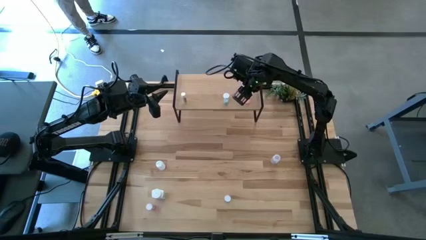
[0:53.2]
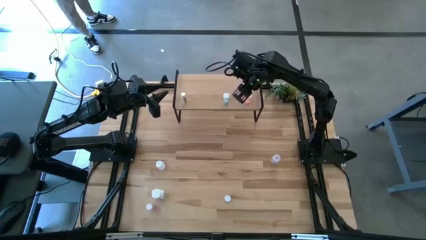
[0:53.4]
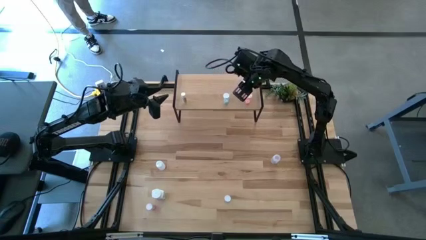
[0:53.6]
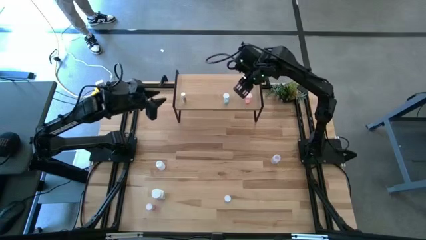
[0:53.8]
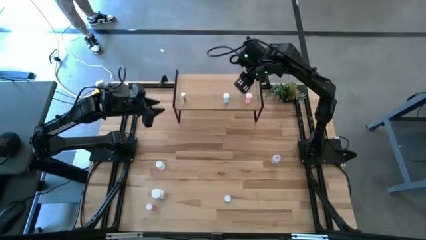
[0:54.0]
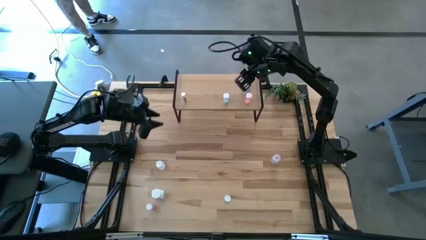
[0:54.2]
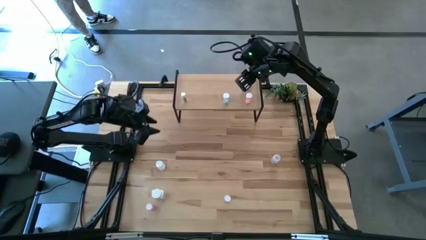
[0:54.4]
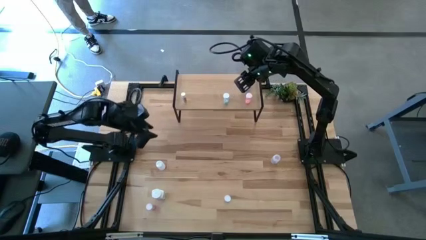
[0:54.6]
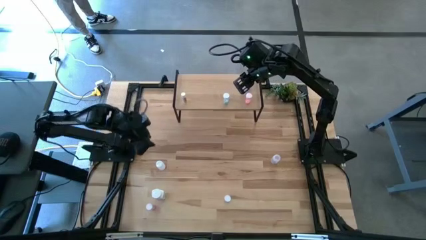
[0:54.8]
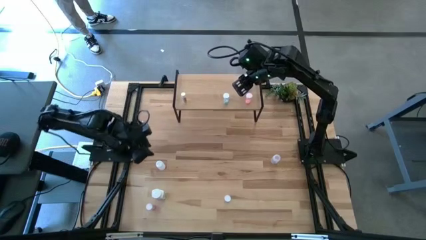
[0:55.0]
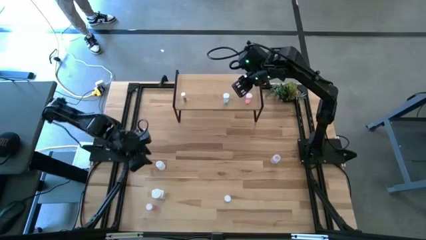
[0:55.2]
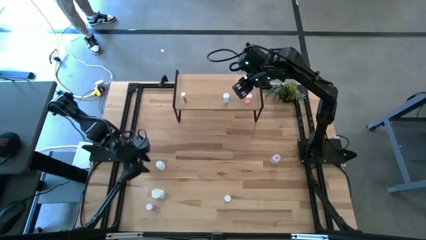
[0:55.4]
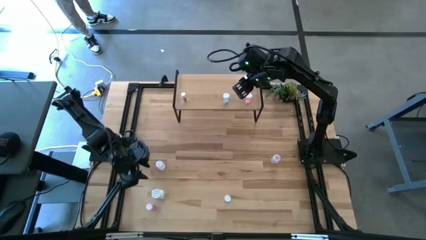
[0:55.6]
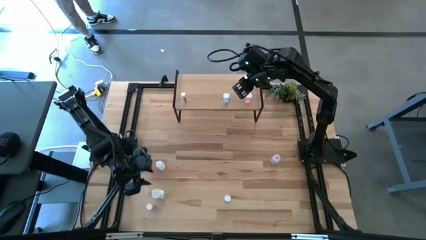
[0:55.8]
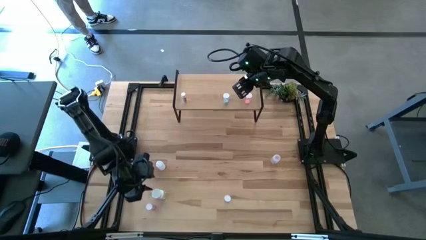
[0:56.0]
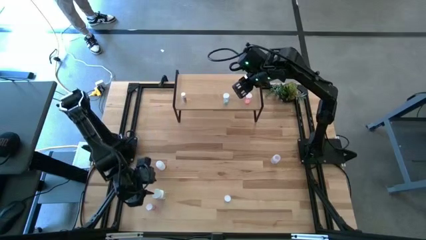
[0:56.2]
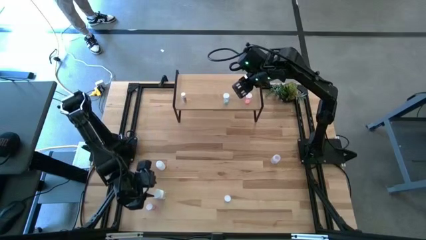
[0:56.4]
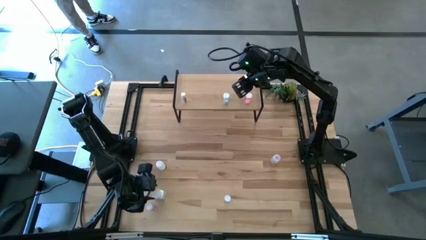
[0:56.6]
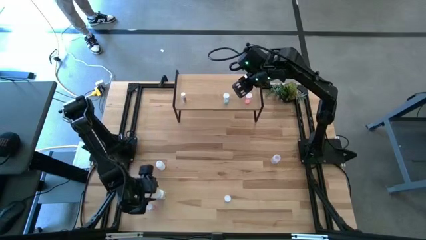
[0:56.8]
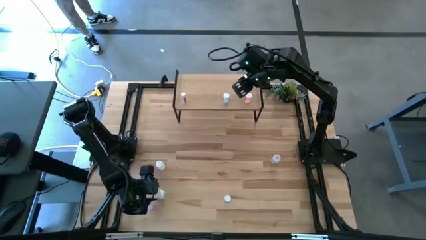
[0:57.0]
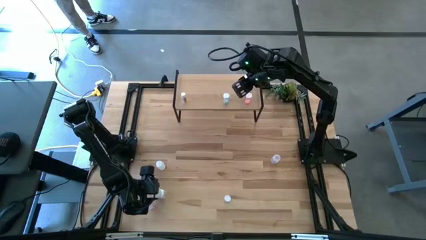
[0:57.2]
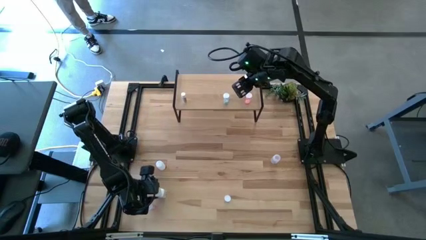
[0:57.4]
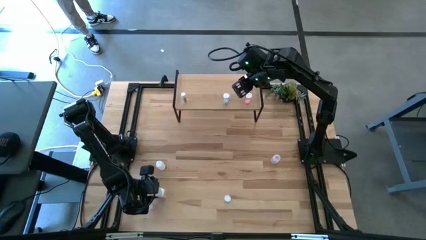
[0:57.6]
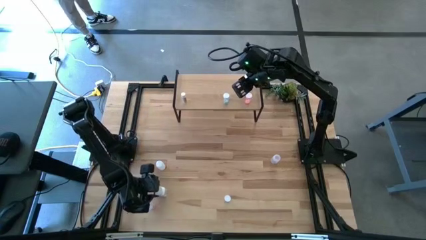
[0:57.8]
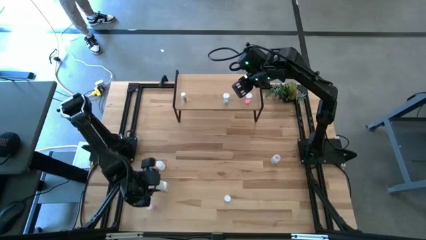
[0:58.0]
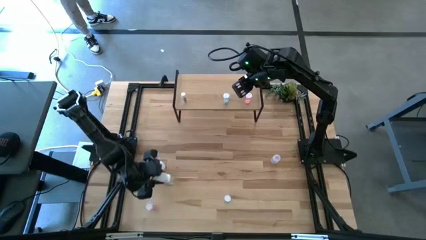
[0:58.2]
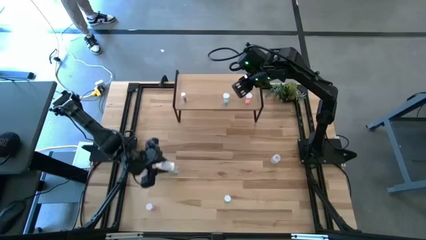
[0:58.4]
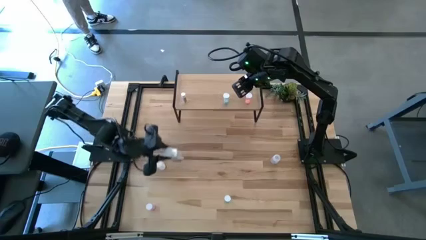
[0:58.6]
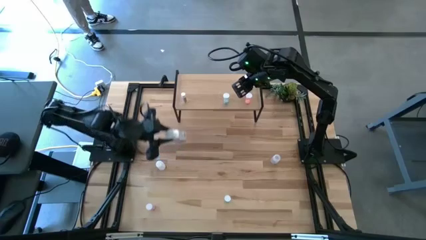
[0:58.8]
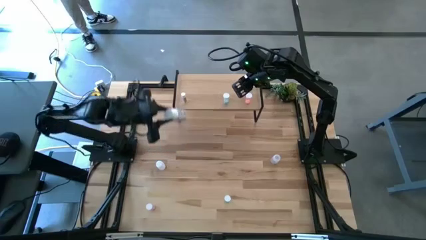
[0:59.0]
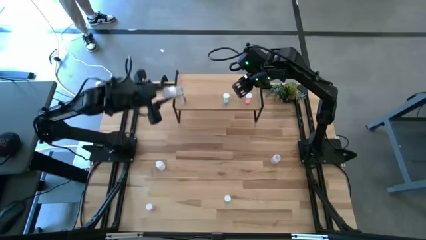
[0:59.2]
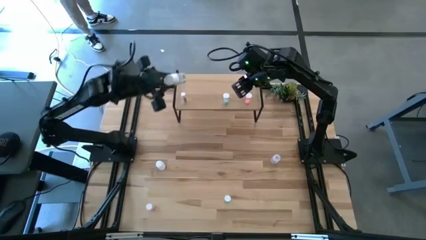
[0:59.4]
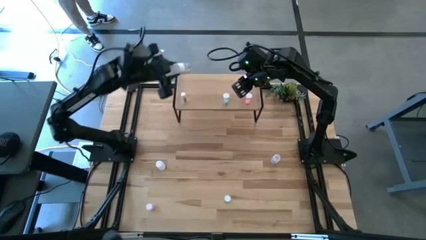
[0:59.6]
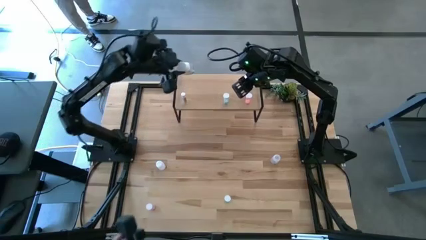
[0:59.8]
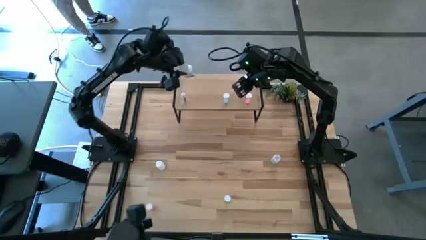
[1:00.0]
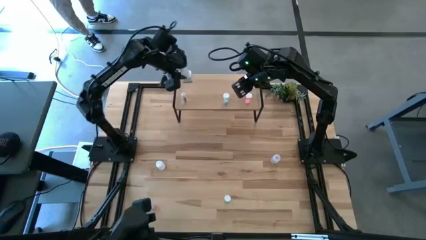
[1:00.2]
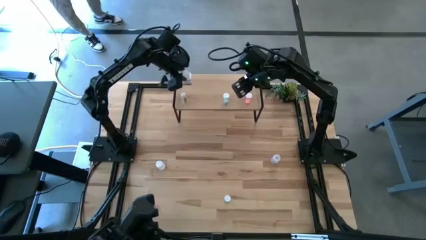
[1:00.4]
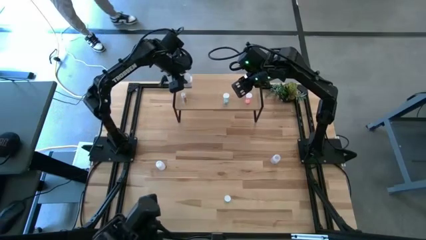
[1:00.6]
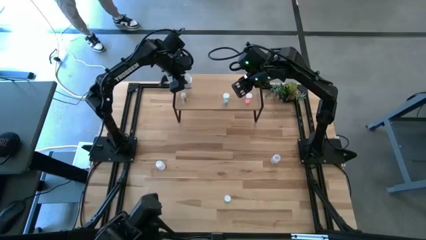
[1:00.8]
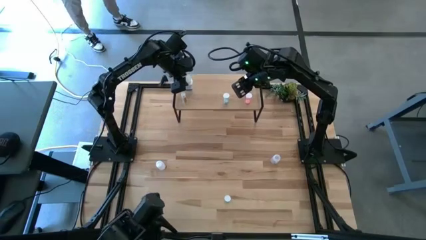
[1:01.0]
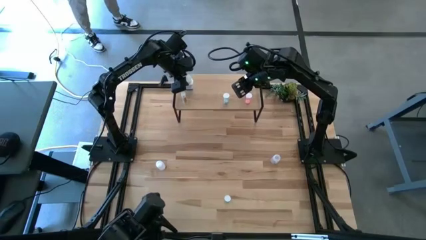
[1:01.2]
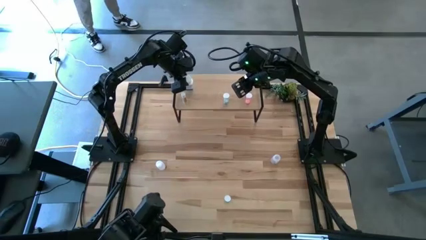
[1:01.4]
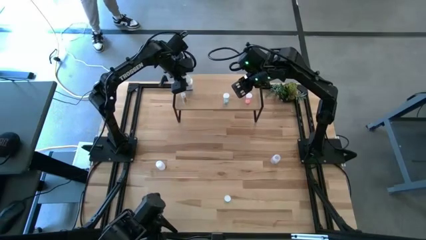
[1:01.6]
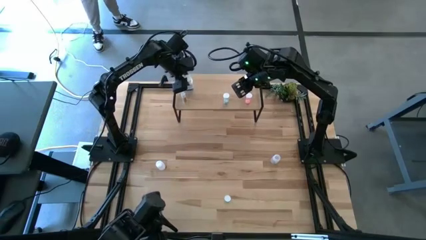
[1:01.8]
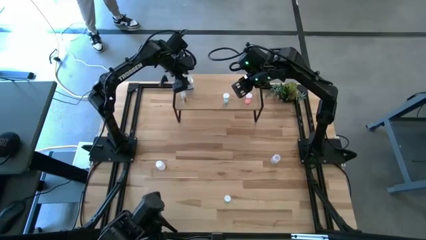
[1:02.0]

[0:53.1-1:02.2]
Task: Pick and place medicine bottles onto shelf by color
Put the white pill bottle on the shelf

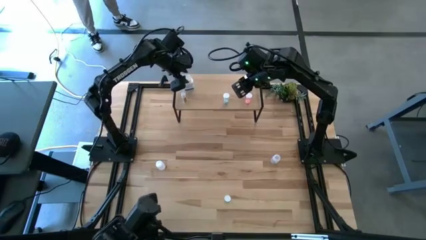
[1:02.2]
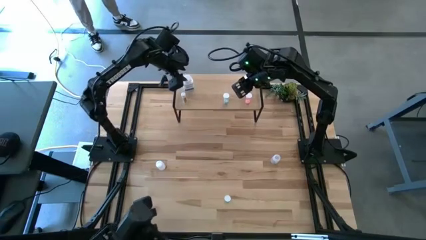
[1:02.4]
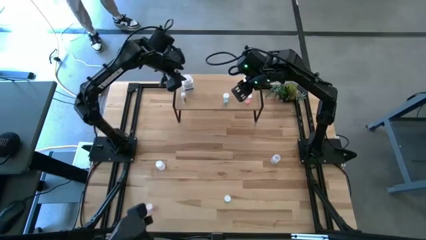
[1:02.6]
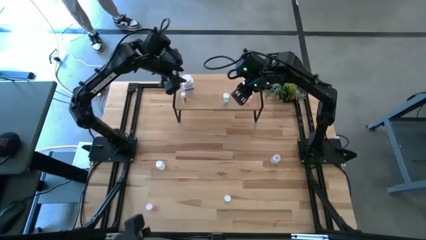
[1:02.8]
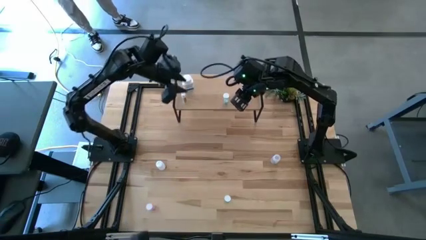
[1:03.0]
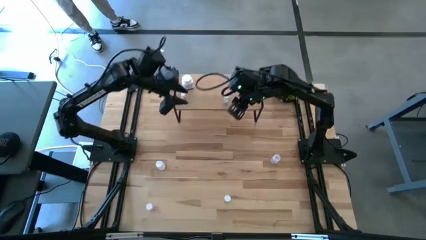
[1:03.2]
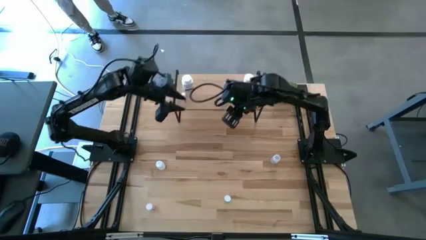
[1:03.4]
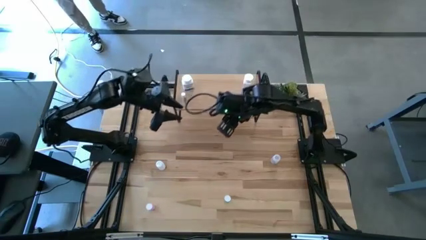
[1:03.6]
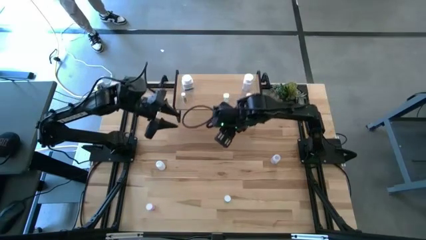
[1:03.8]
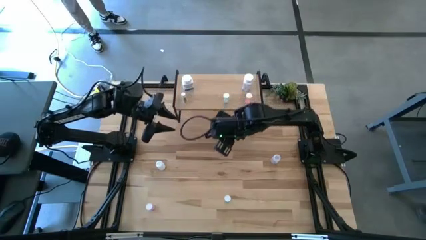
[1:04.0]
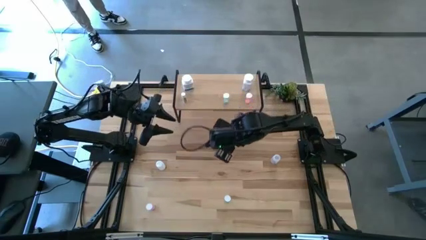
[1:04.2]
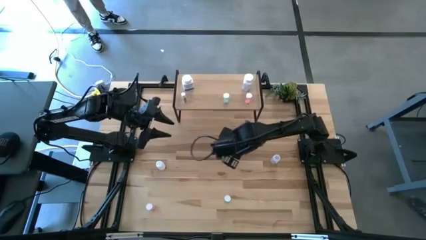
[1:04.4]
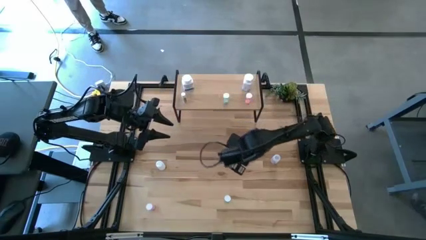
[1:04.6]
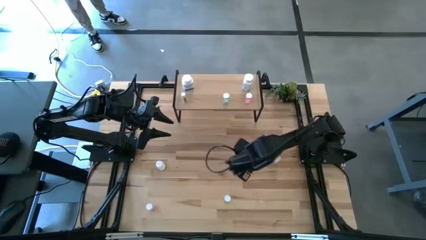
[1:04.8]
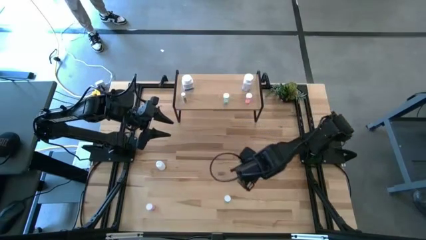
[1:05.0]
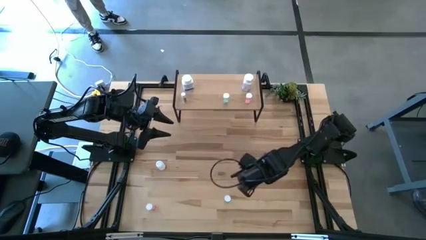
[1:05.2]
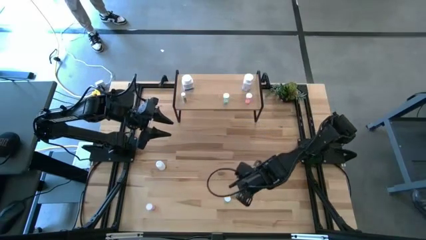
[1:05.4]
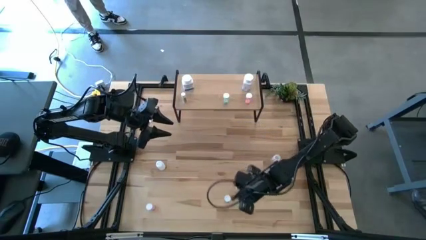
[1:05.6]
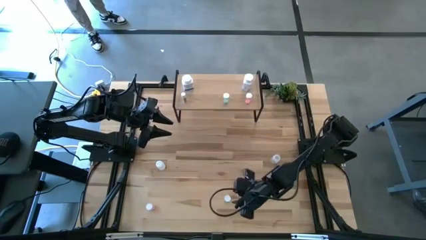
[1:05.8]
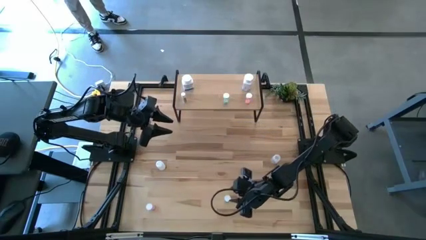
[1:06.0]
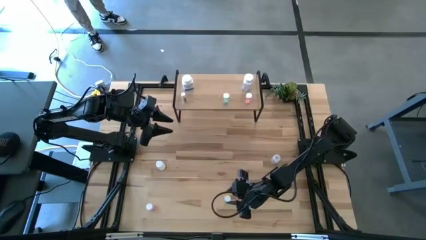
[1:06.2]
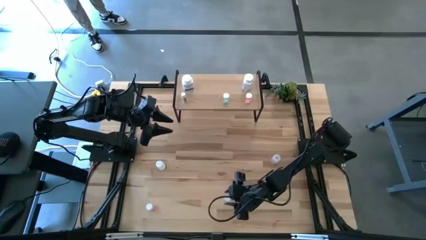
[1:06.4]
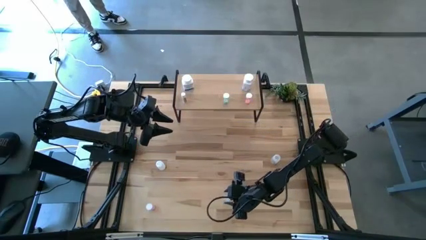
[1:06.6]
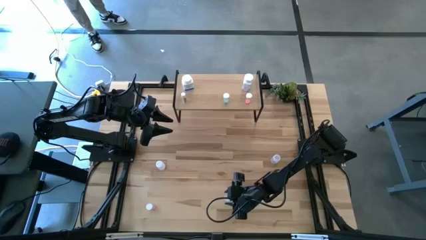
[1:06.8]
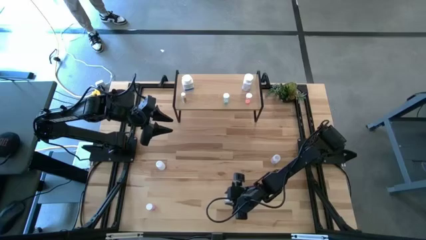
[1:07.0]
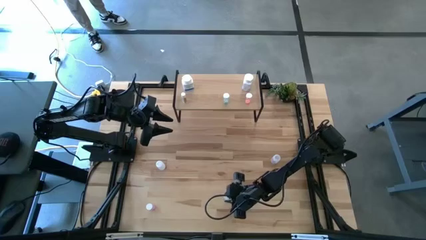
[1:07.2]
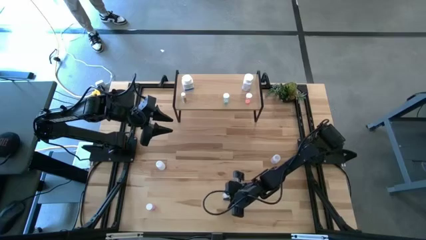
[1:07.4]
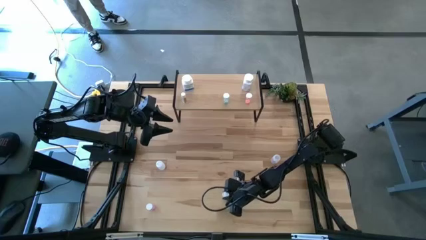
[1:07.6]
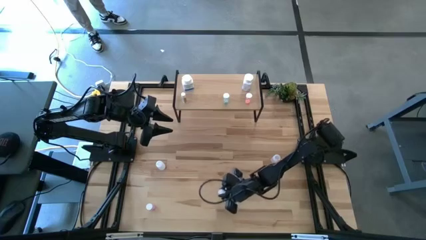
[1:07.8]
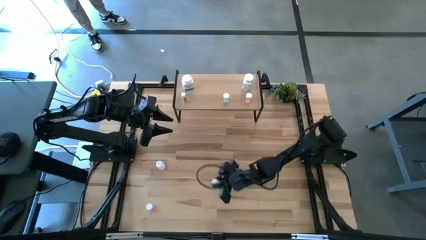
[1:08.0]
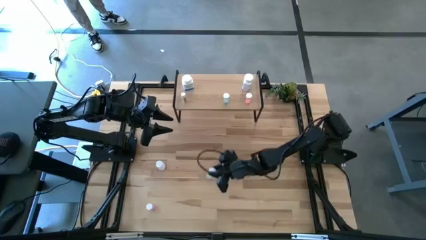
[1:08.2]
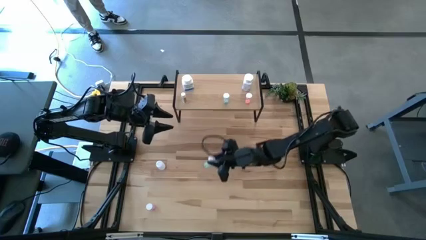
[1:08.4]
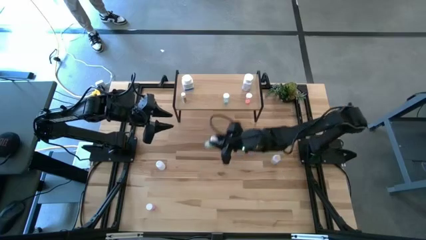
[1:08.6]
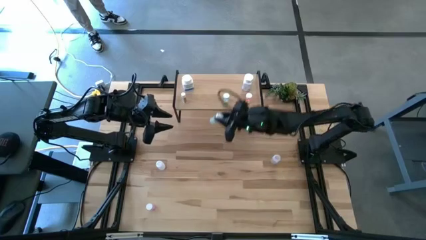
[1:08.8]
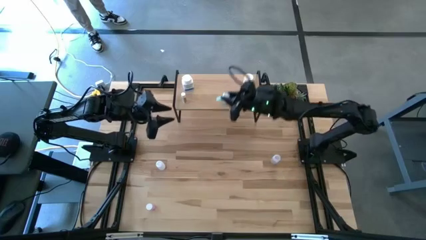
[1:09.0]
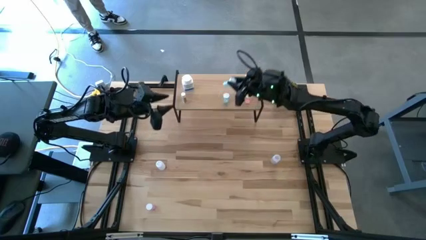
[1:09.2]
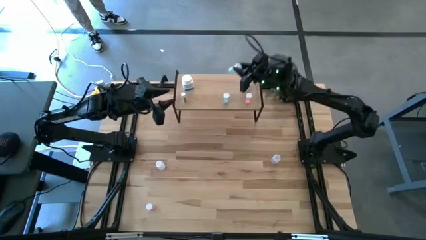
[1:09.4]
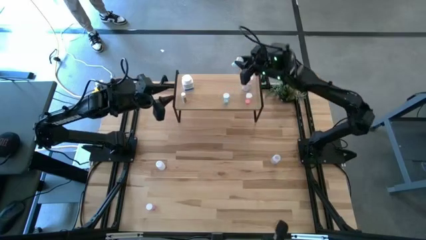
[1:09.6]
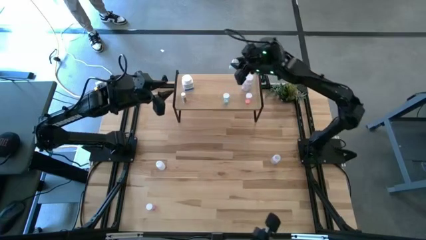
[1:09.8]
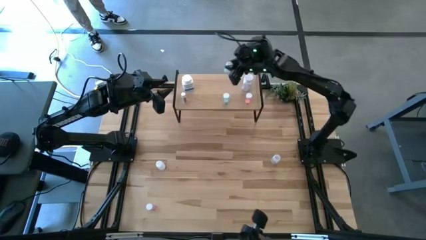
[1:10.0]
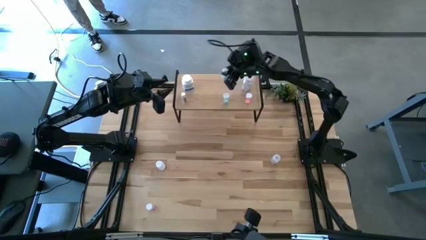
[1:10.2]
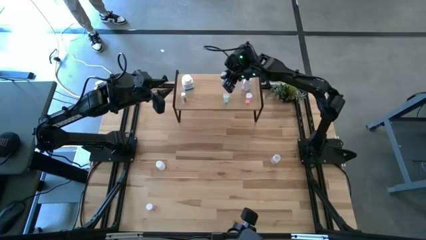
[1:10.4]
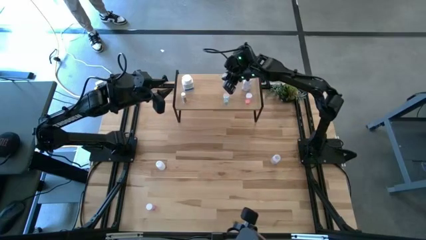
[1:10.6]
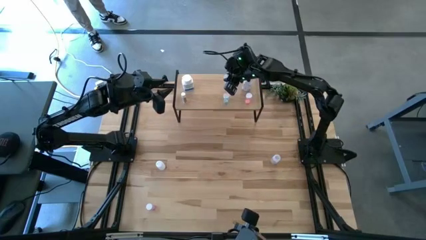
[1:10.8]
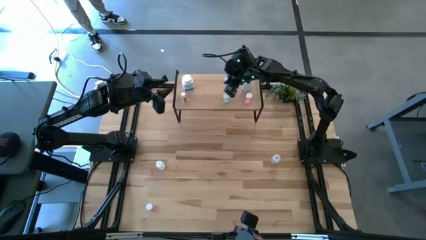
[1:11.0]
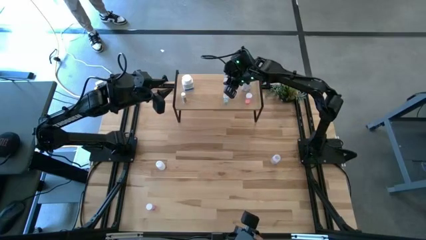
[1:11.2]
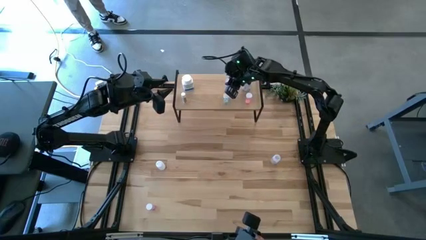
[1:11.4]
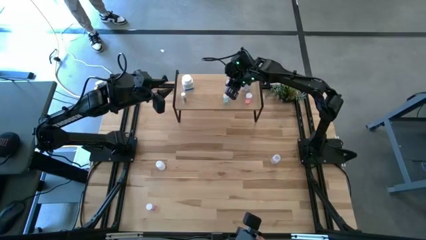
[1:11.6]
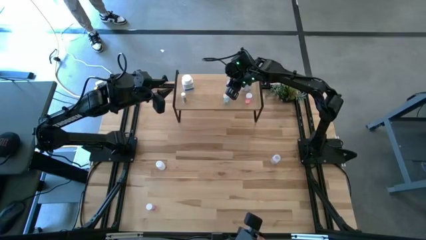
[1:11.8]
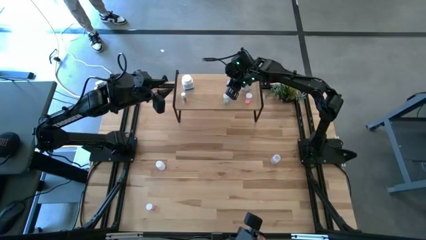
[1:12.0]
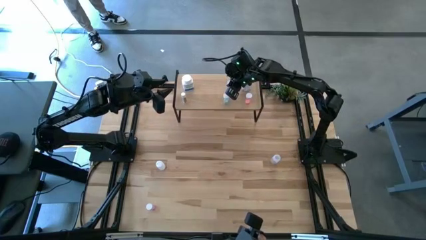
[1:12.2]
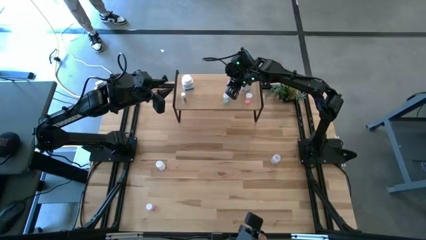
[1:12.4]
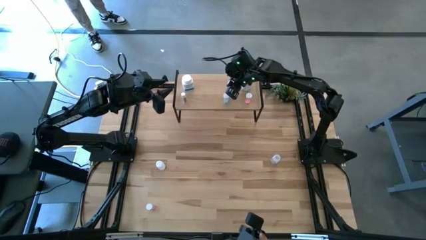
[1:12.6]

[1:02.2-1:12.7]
Put the blue pill bottle on the shelf
